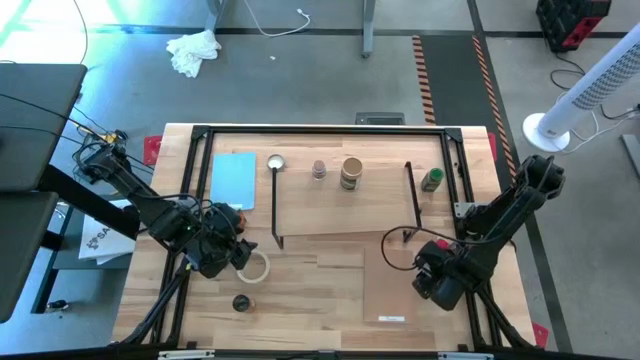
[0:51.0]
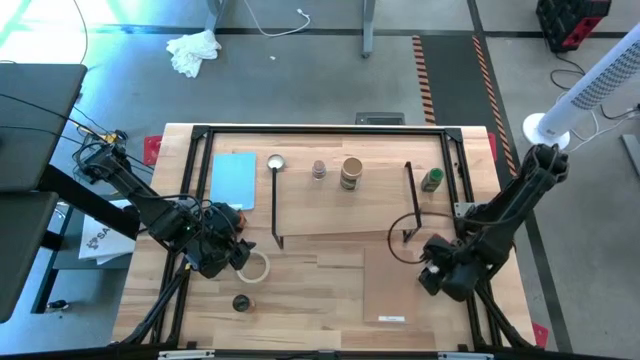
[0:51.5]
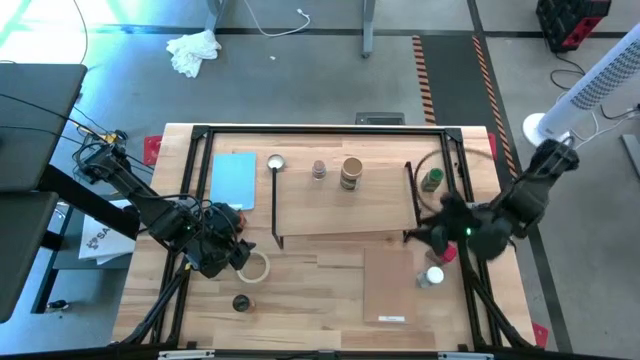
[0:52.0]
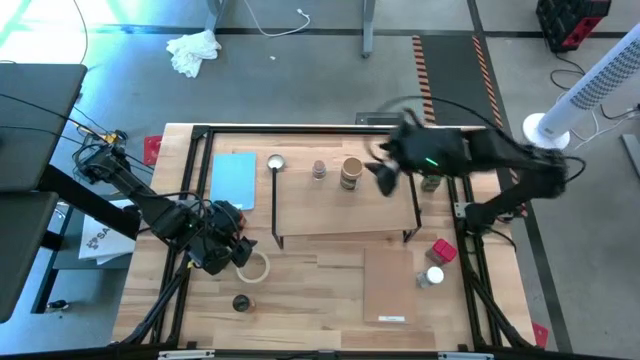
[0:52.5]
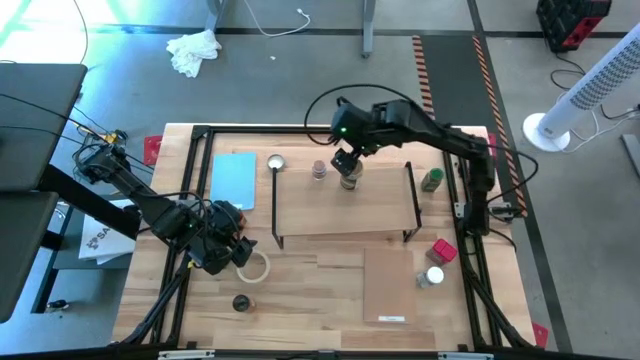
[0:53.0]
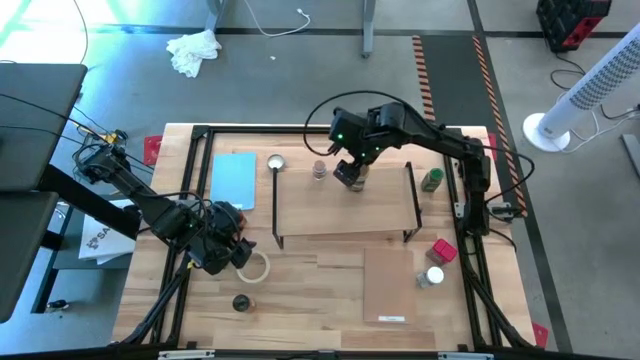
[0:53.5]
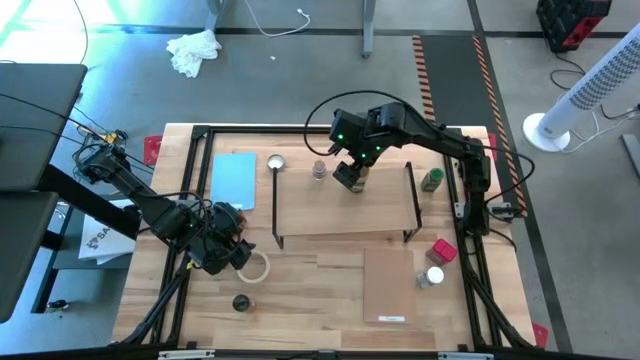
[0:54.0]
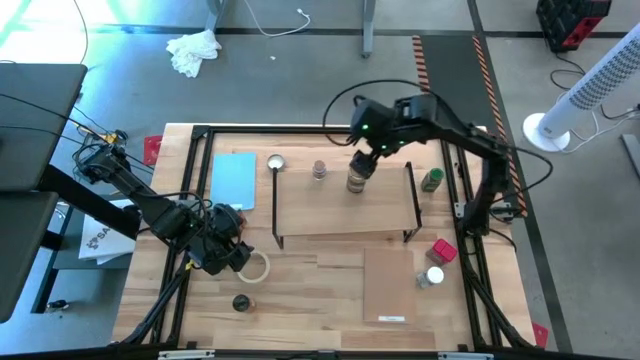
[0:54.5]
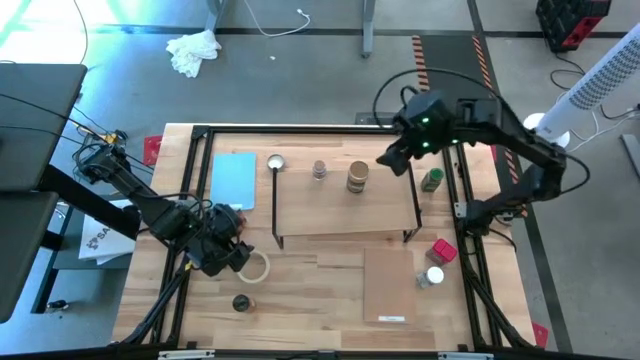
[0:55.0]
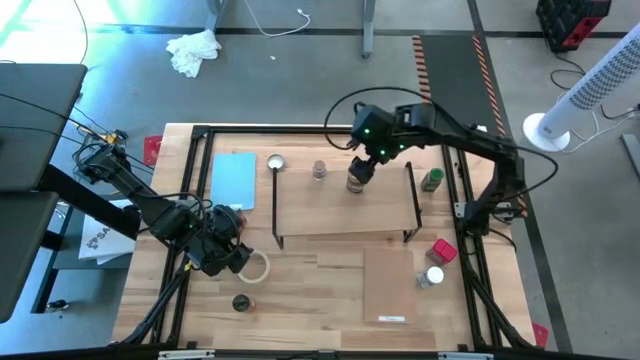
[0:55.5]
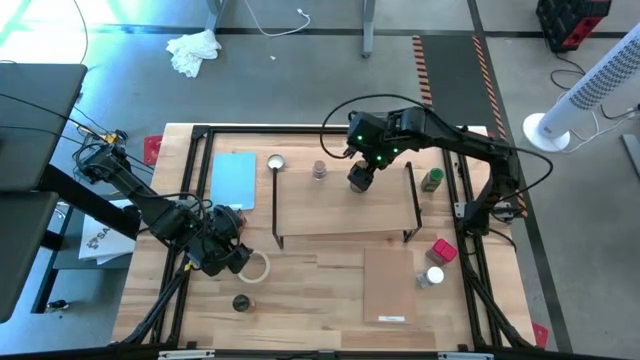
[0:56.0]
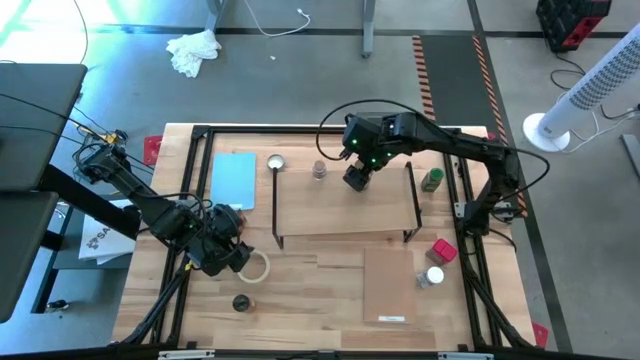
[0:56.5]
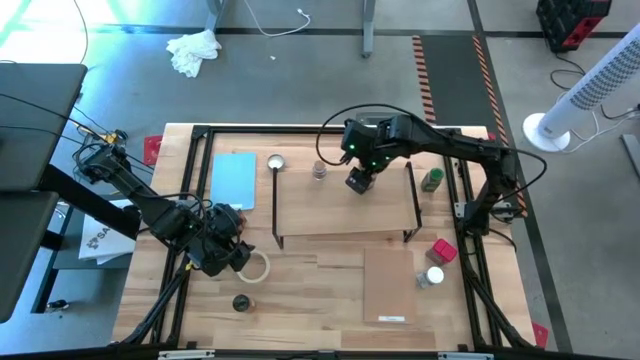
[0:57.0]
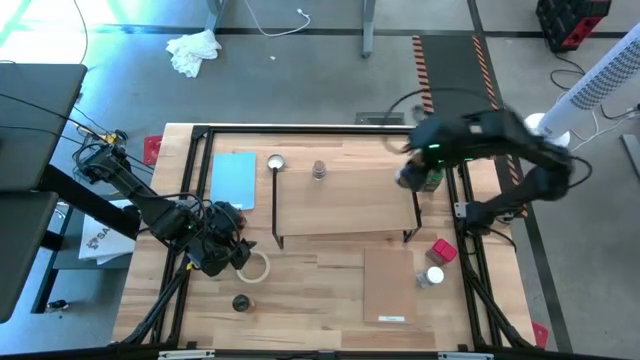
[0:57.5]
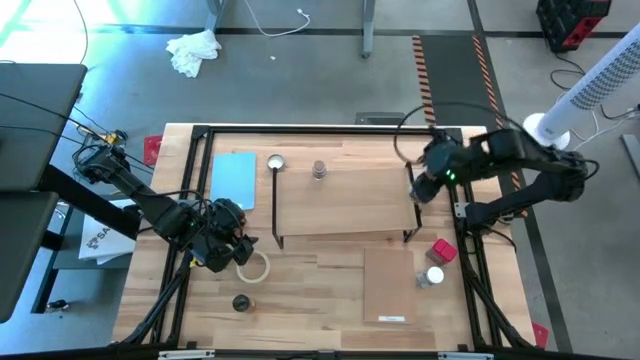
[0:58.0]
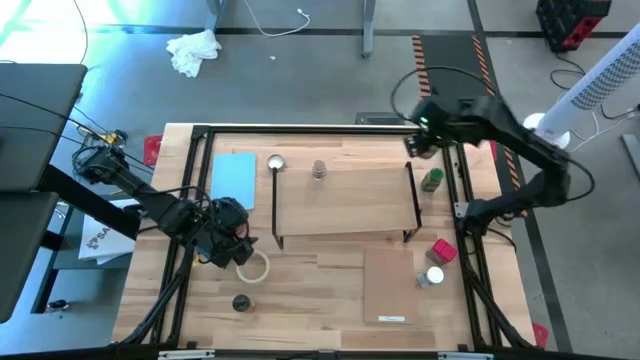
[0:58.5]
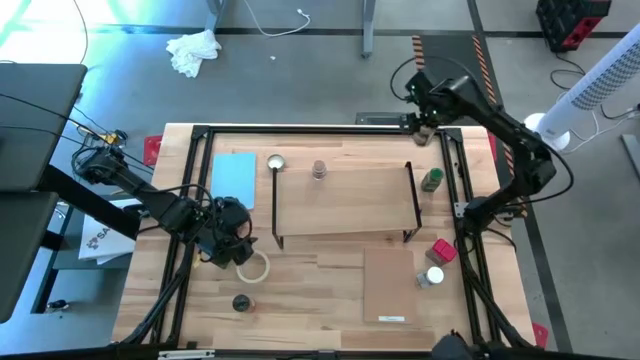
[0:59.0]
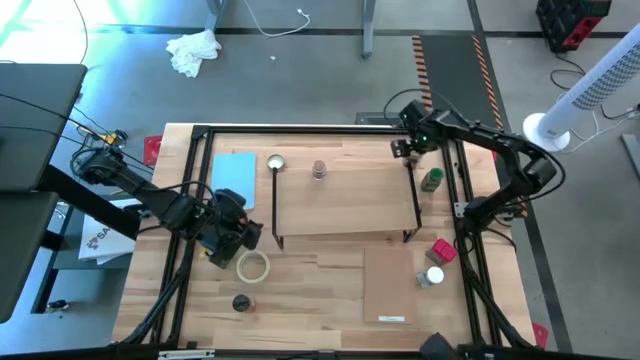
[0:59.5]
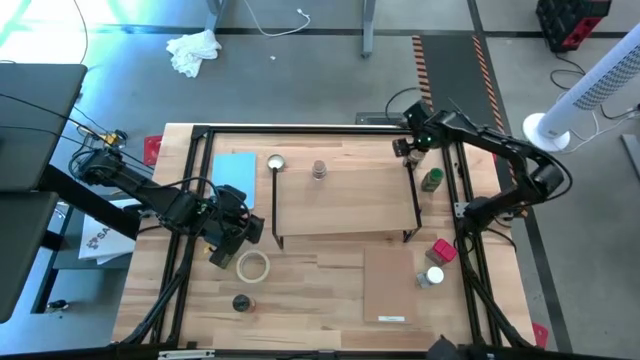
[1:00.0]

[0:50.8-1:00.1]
Task: Shelf spices
Remove the brown seasoning bottle from the shelf

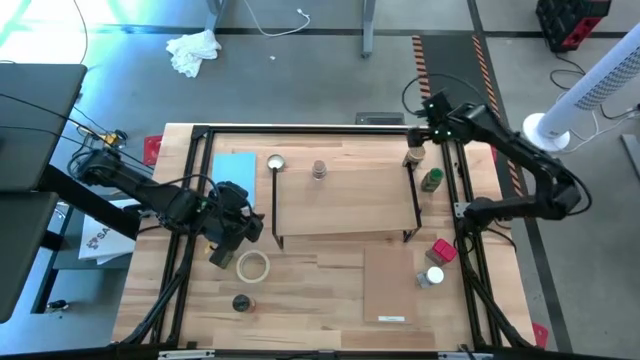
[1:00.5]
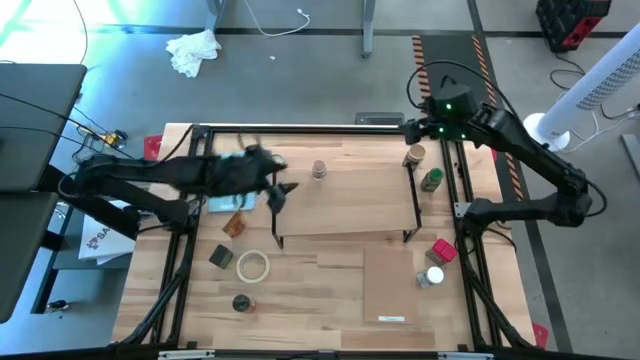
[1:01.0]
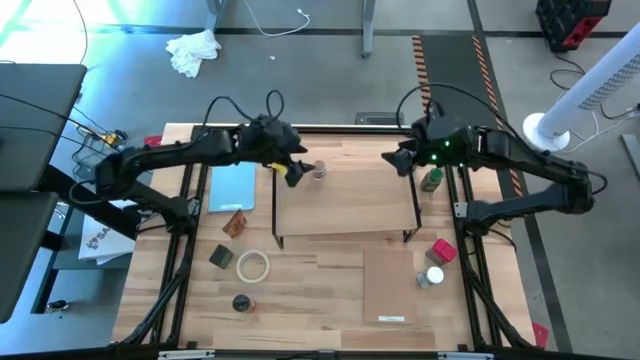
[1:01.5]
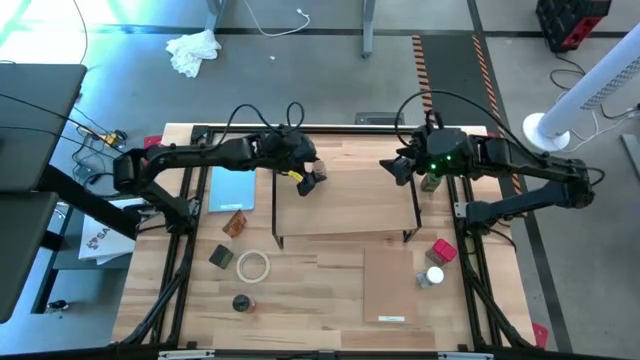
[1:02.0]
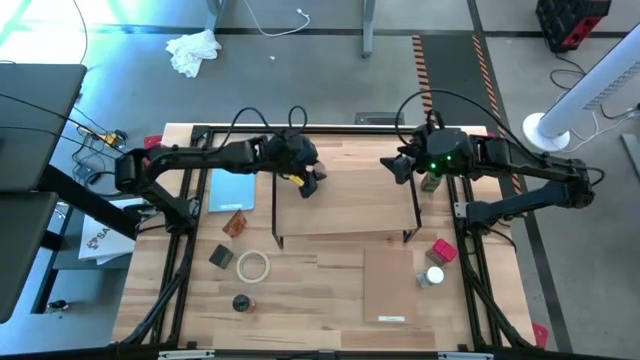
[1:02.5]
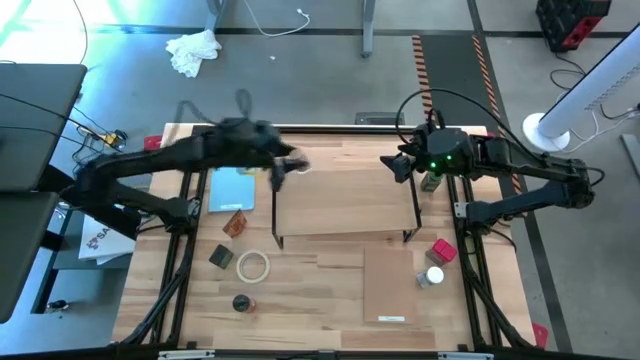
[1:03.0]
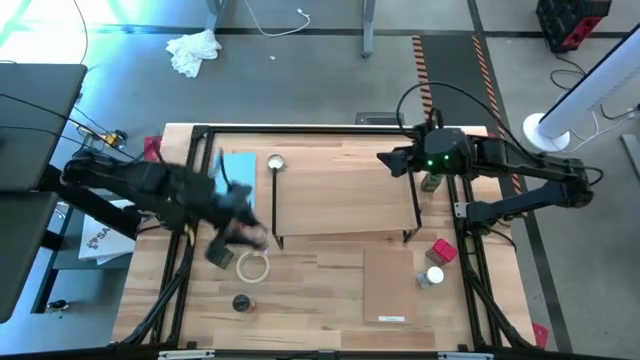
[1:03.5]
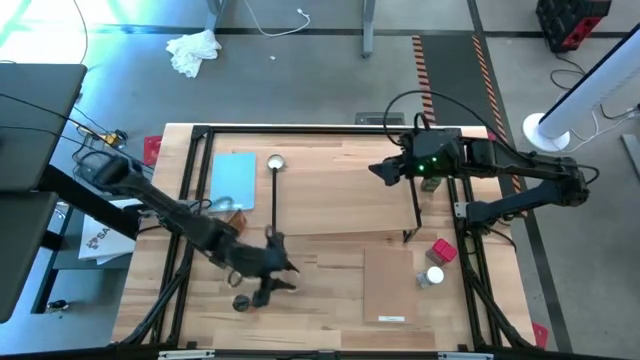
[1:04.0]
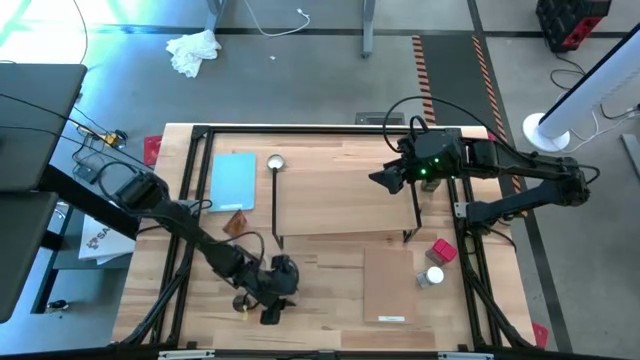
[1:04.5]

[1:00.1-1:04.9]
Remove the transparent seasoning bottle from the shelf

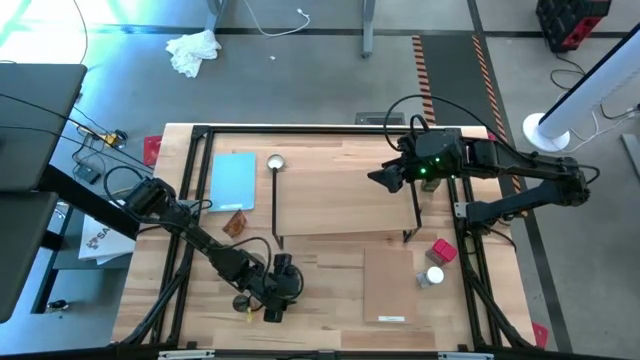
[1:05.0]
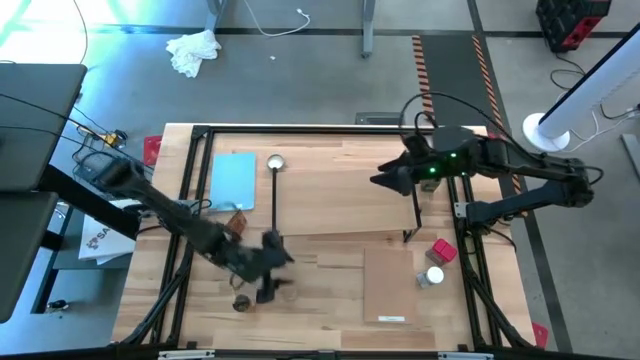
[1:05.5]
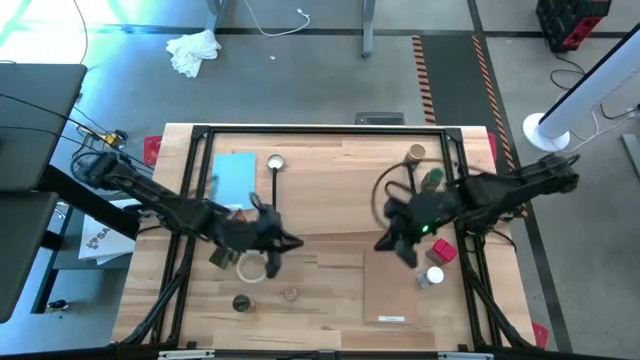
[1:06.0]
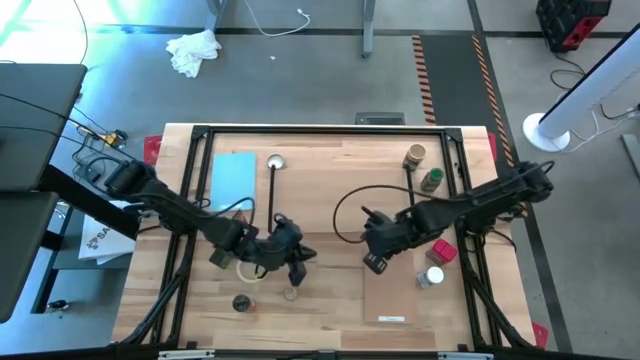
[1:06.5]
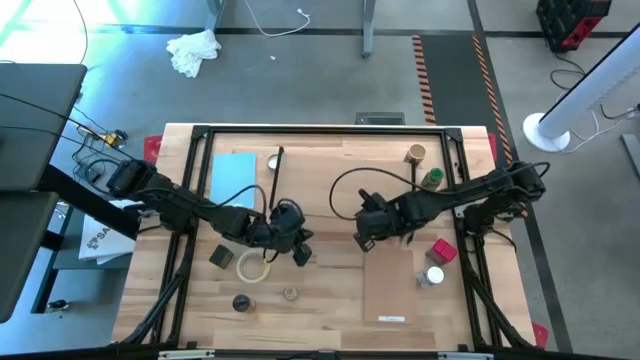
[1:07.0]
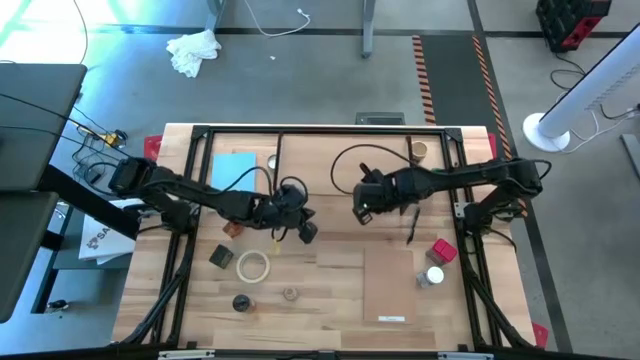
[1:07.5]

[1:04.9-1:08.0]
Move the shelf to the top center of the table

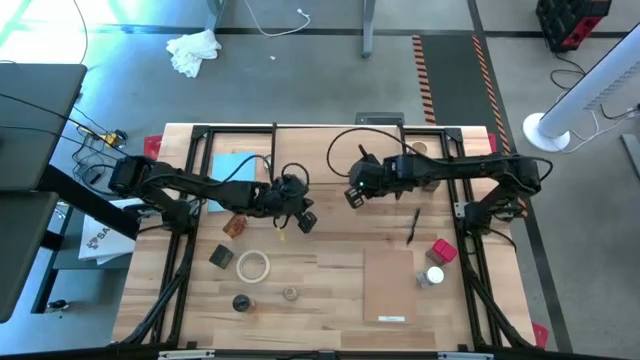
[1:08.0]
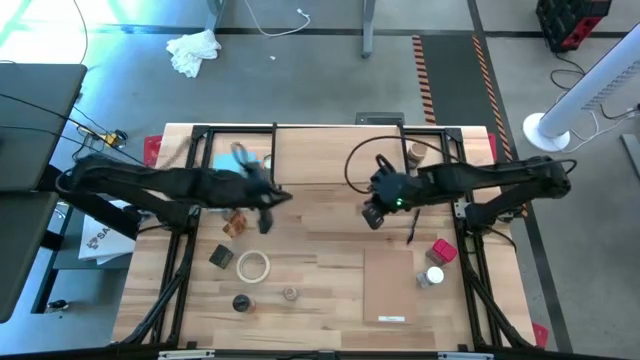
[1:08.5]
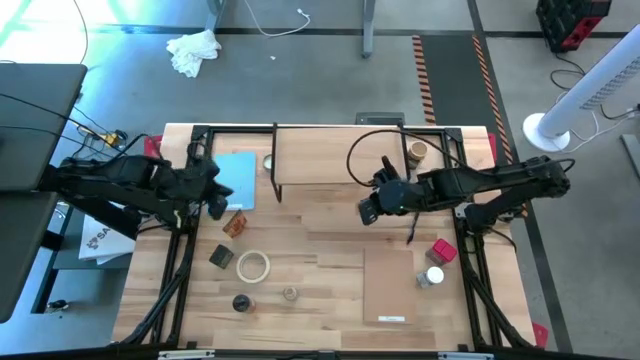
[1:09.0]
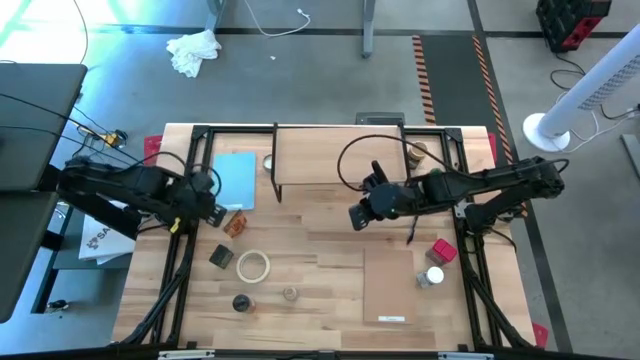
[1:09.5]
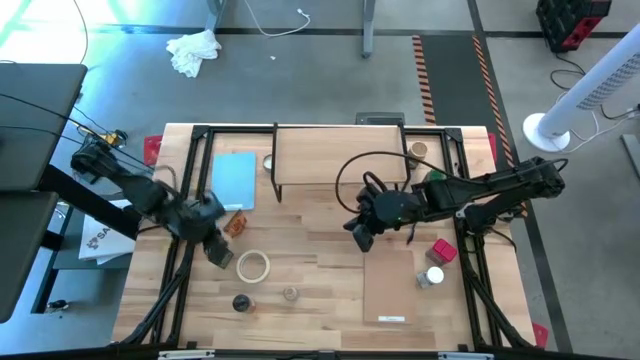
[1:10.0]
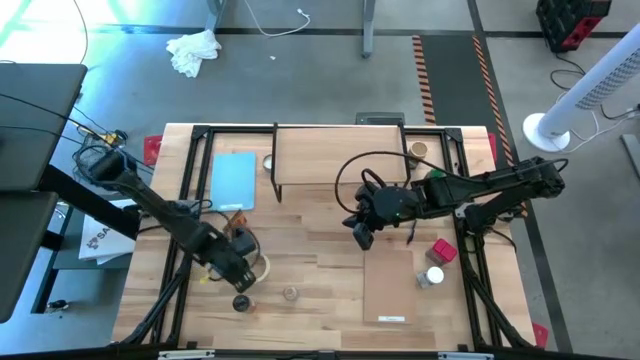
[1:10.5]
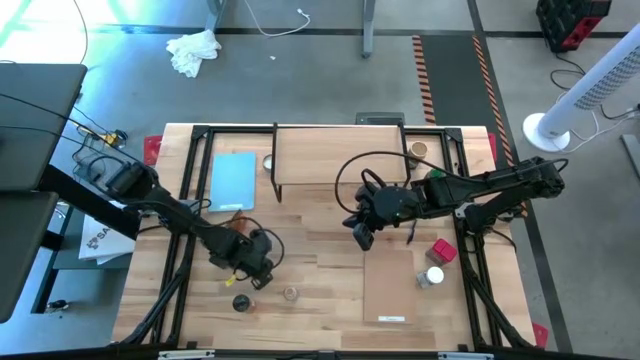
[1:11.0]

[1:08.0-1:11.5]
Move the white tape to the middle right of the table

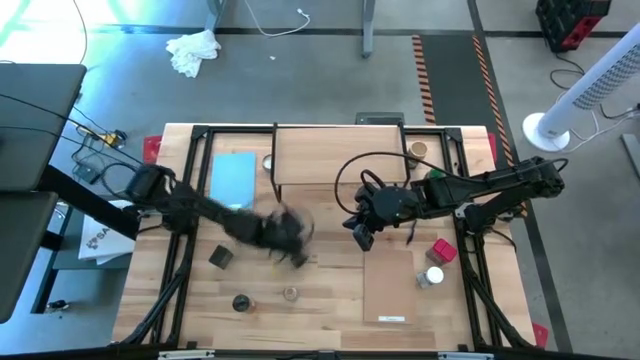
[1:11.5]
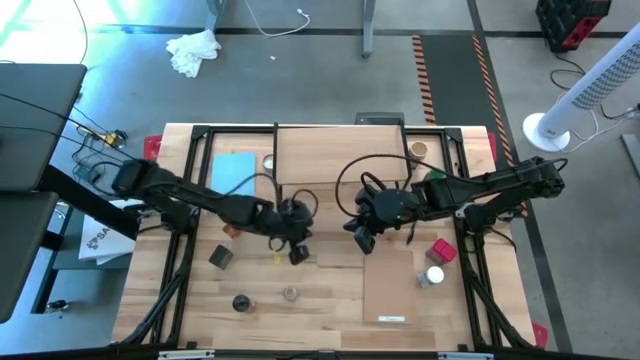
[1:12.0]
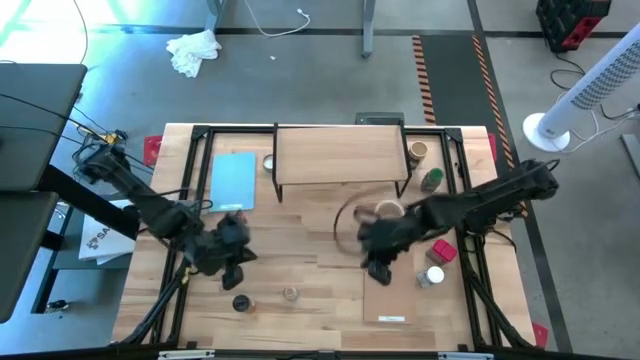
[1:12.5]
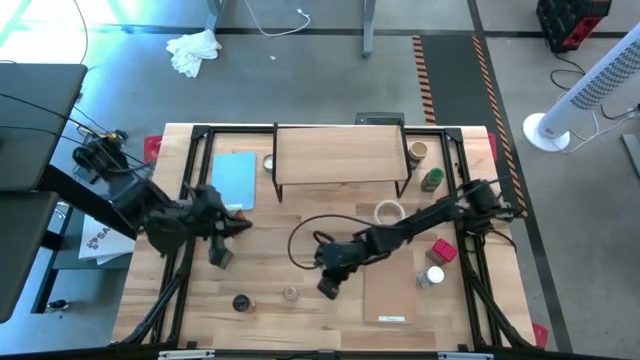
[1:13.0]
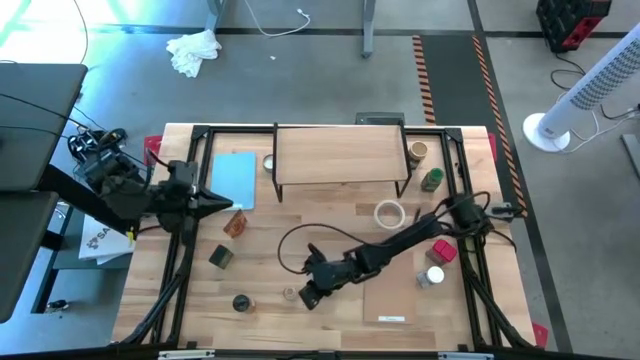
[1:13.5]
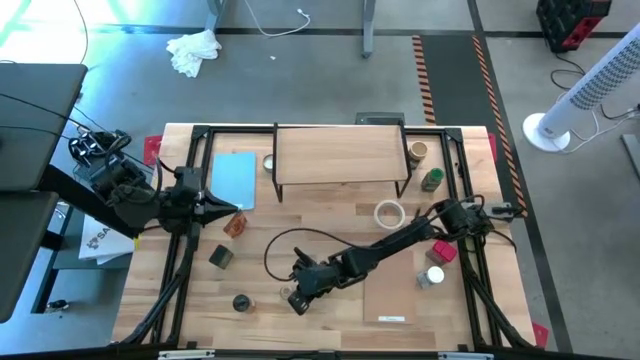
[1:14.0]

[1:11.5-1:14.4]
Move the transparent seasoning bottle to the bottom left of the table
